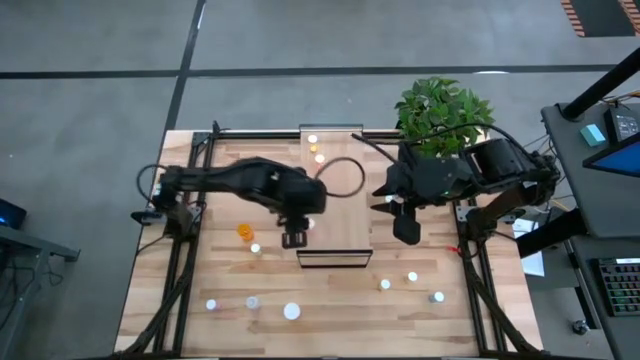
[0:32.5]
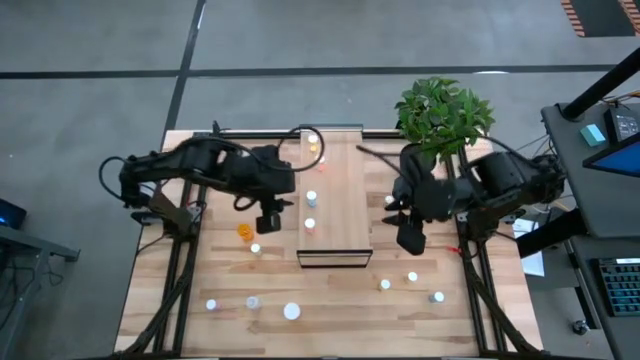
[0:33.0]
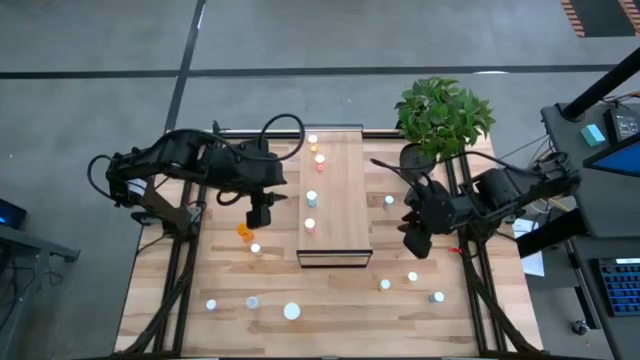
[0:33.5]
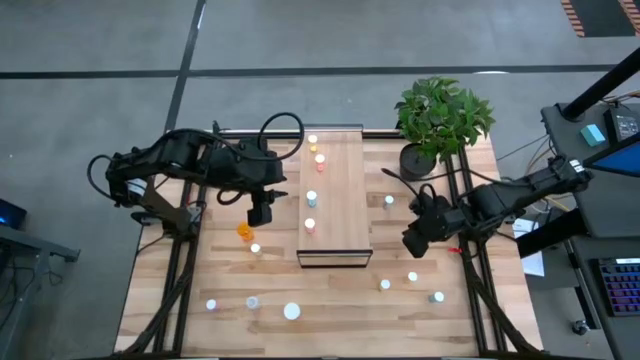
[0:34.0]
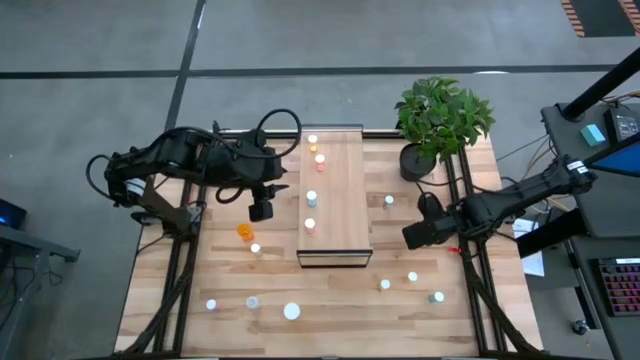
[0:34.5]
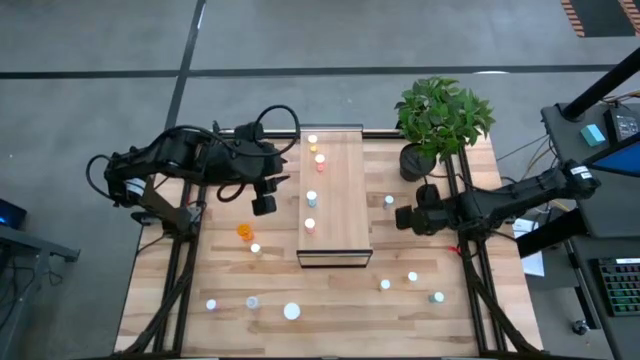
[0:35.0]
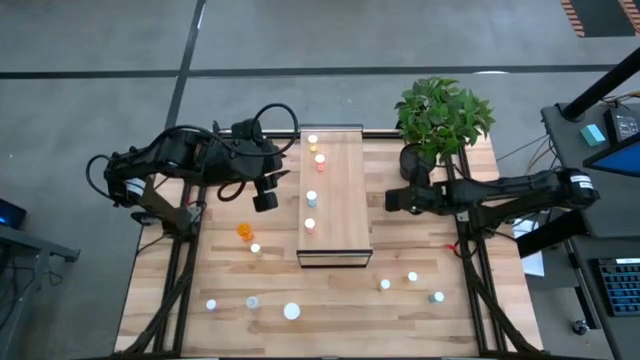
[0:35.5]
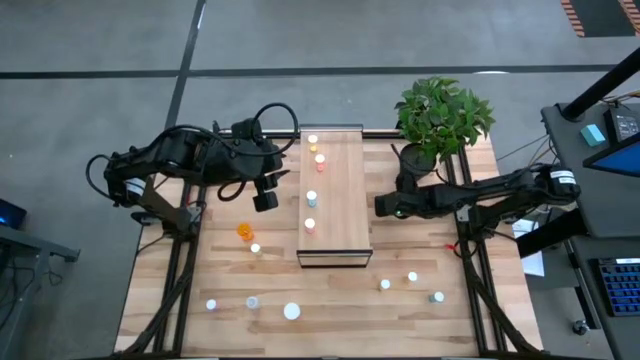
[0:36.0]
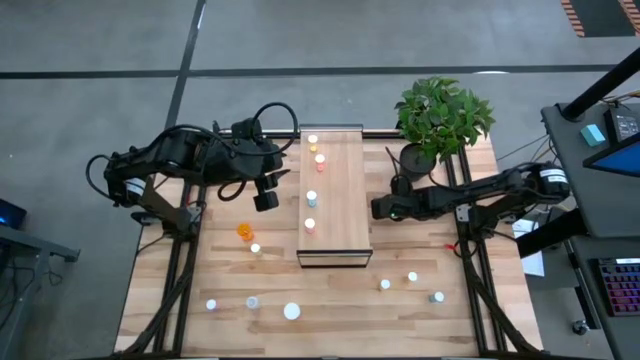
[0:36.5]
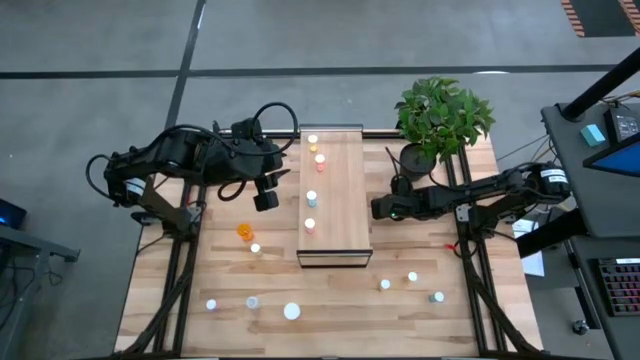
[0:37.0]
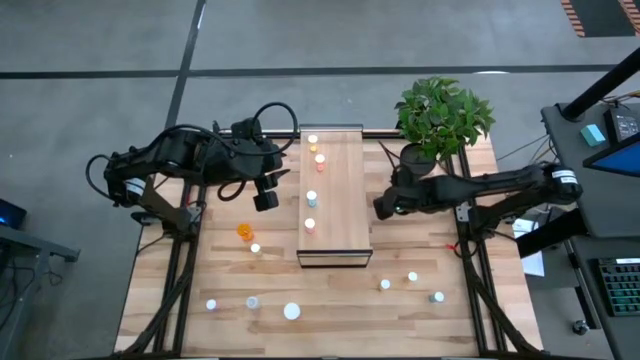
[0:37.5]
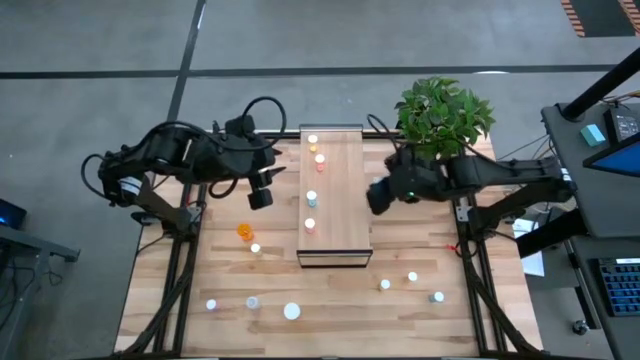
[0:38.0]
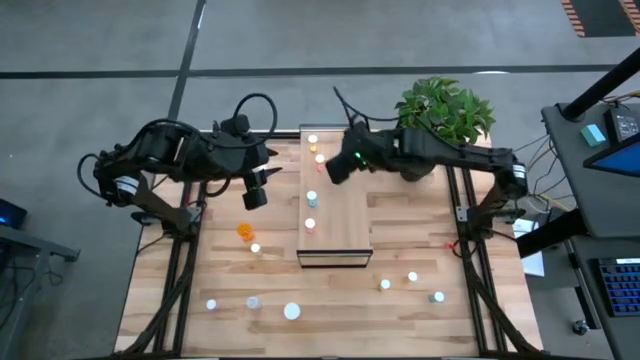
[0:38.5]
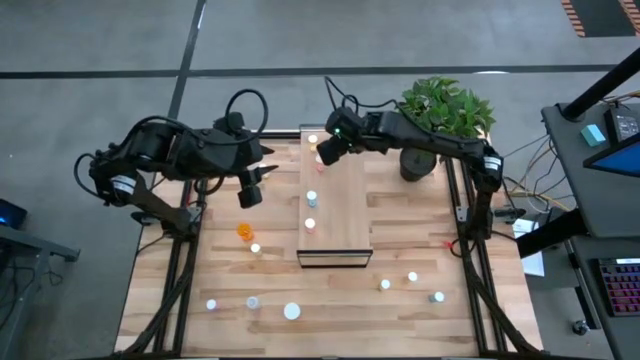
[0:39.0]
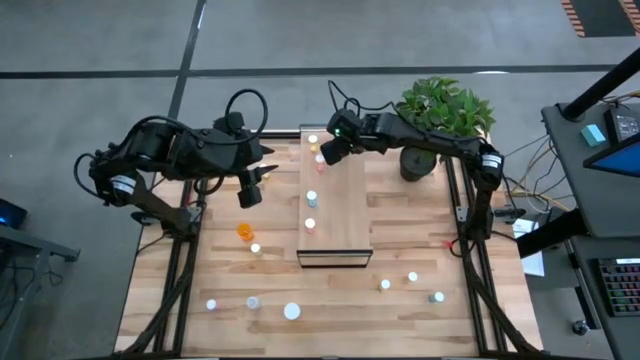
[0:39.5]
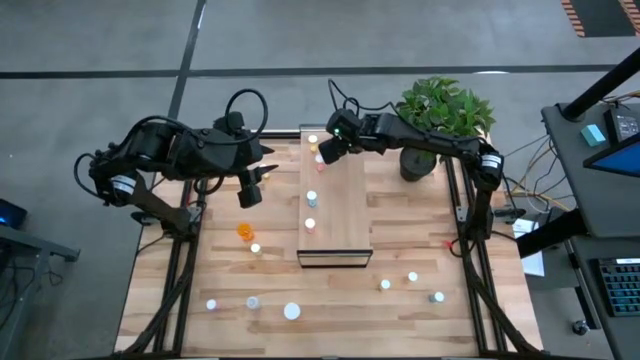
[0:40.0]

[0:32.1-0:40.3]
Task: Pick and place medicine bottles onto shelf by color
Put the top blue bottle on the shelf

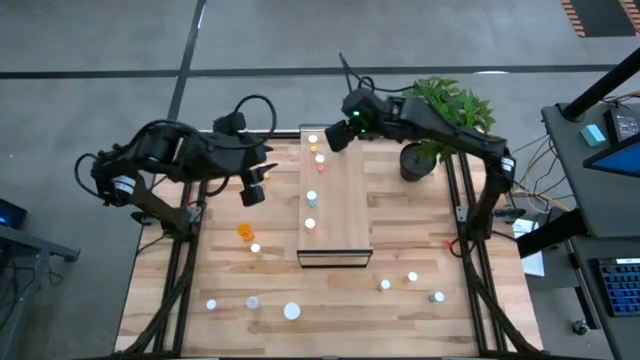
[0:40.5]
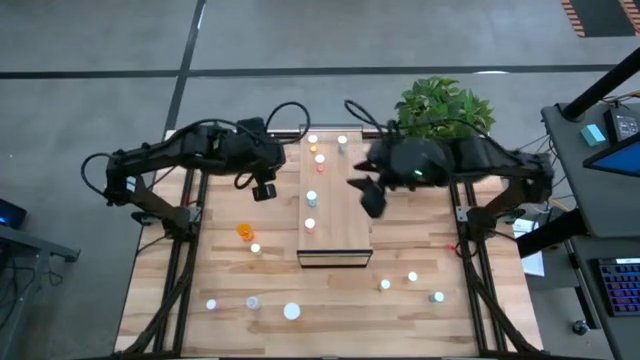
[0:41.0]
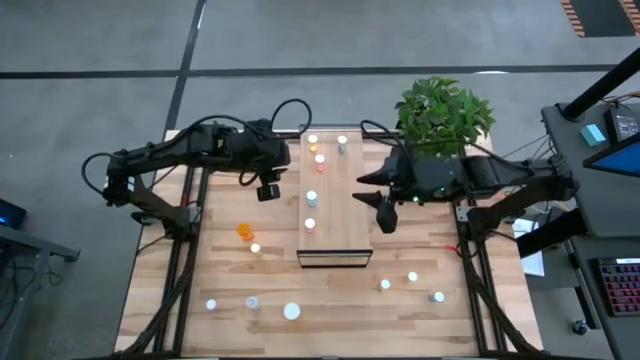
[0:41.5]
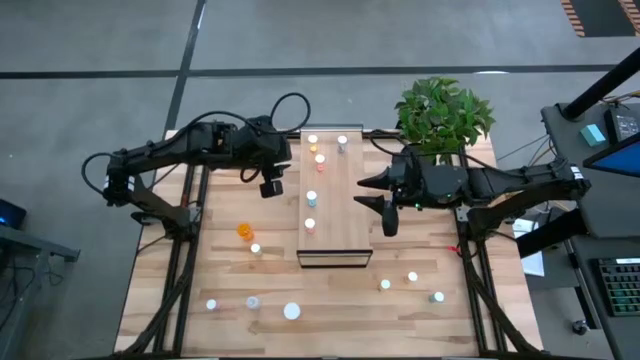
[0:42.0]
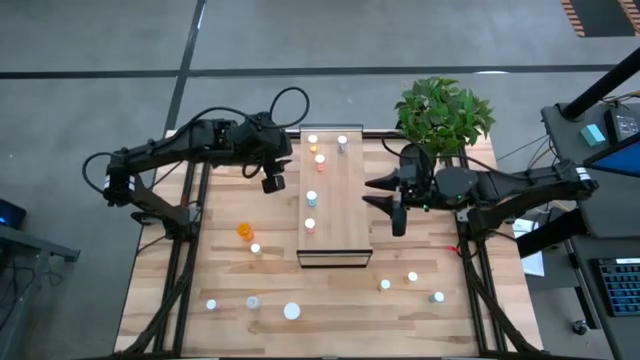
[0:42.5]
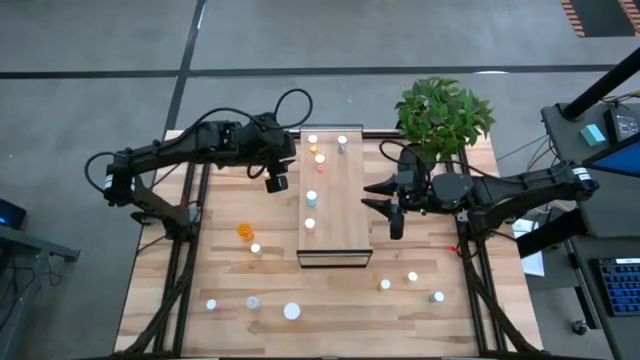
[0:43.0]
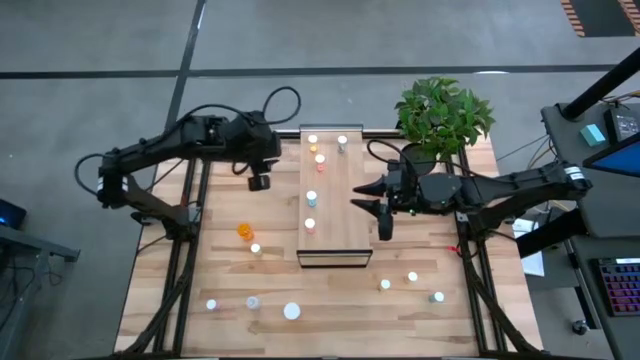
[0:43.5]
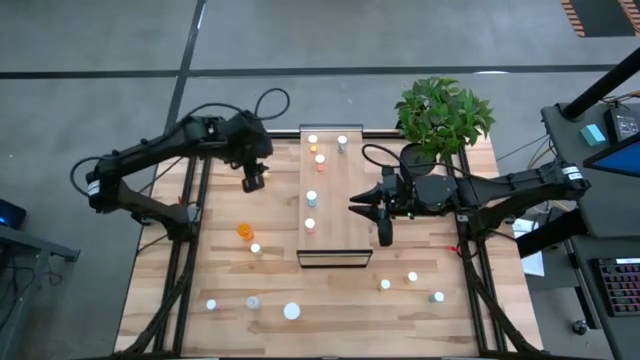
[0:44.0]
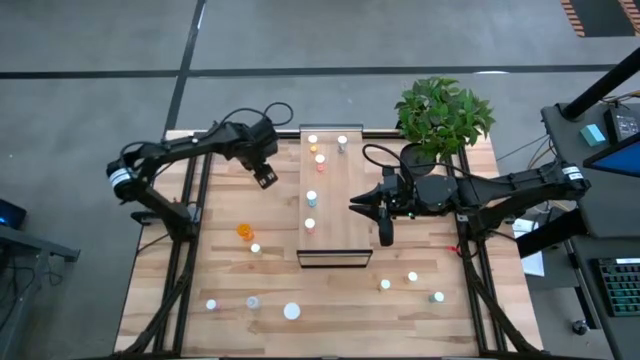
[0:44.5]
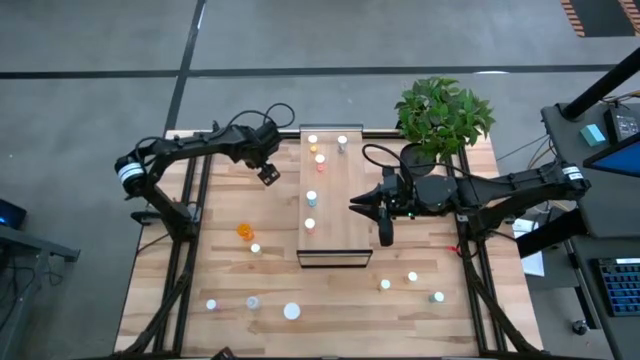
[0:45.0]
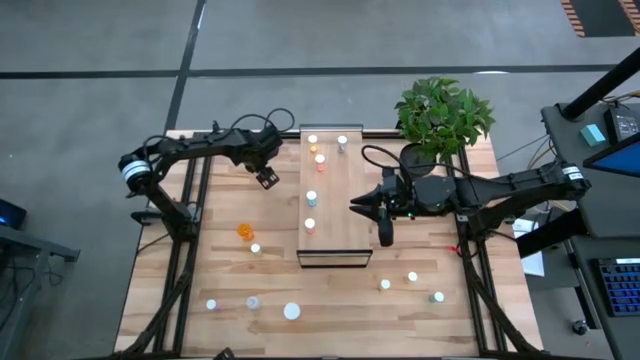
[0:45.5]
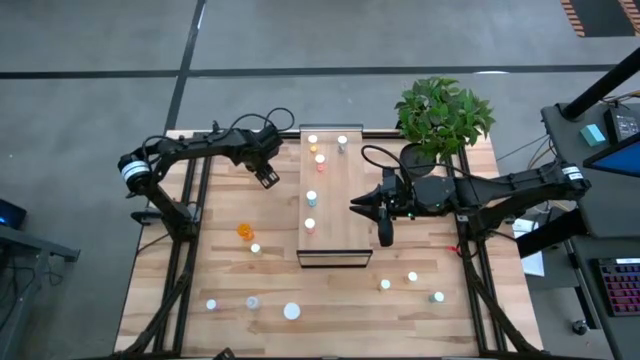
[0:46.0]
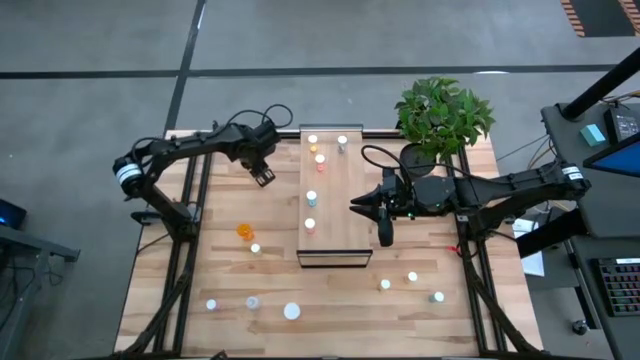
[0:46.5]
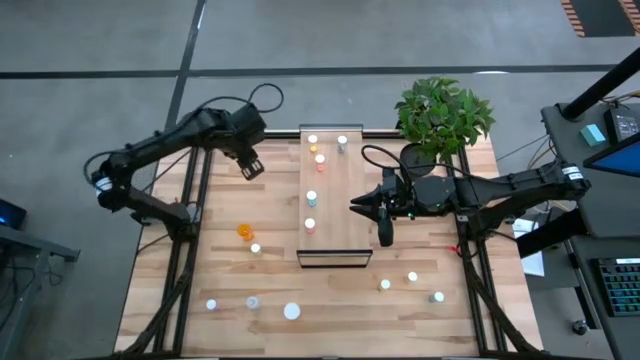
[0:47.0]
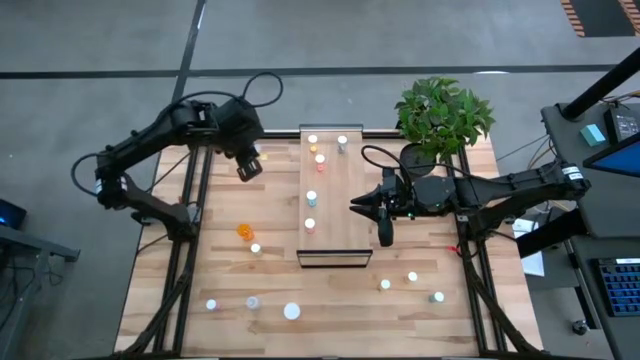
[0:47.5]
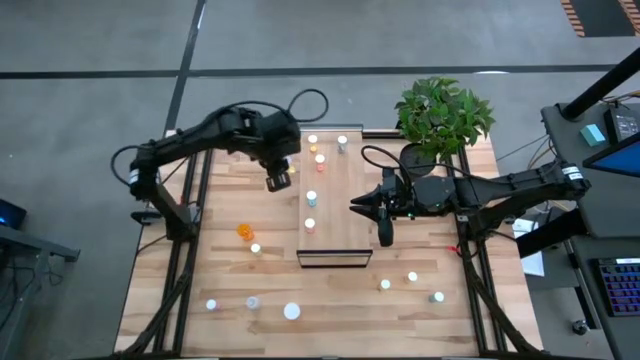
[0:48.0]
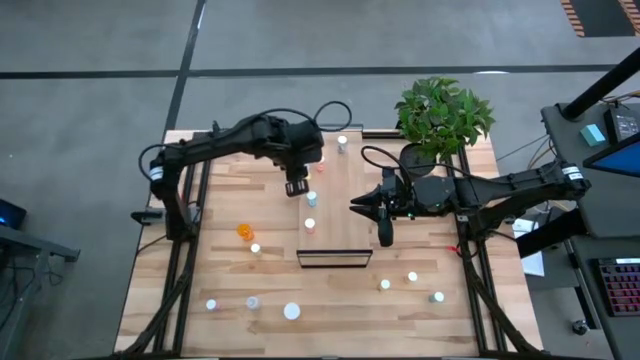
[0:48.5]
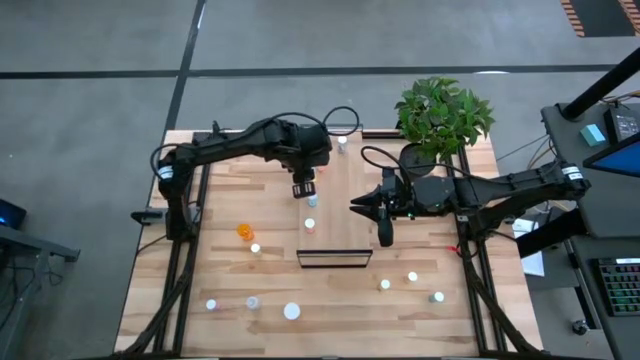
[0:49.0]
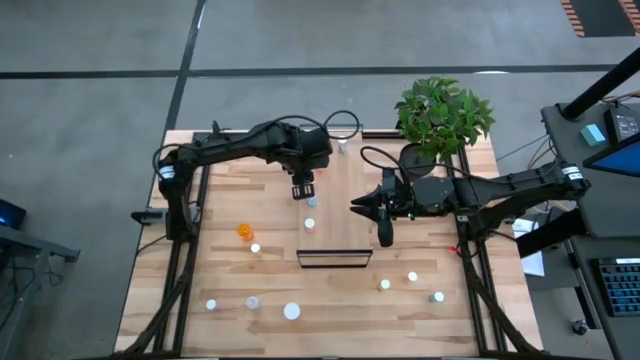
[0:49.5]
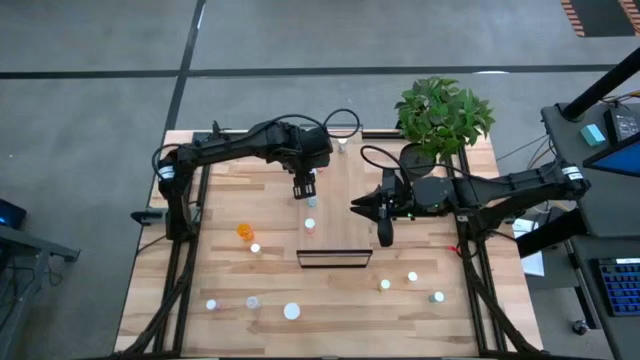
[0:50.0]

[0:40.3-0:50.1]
Put the top yellow bottle on the shelf

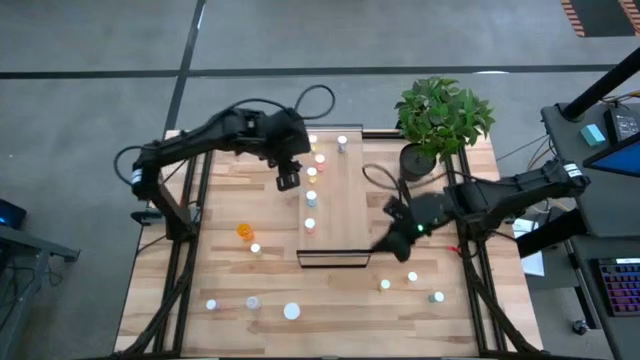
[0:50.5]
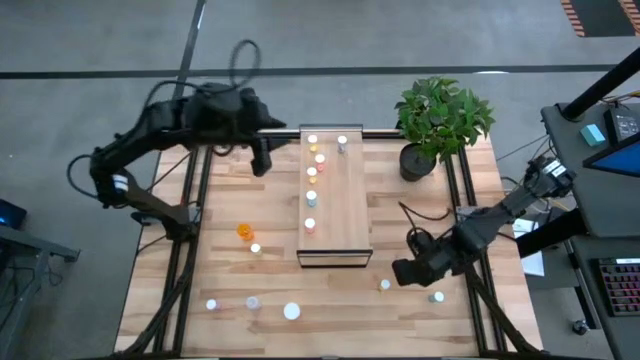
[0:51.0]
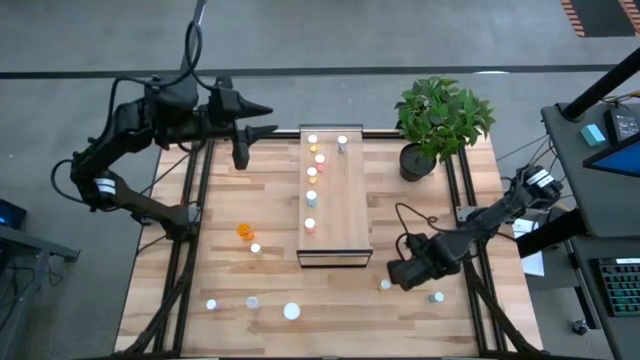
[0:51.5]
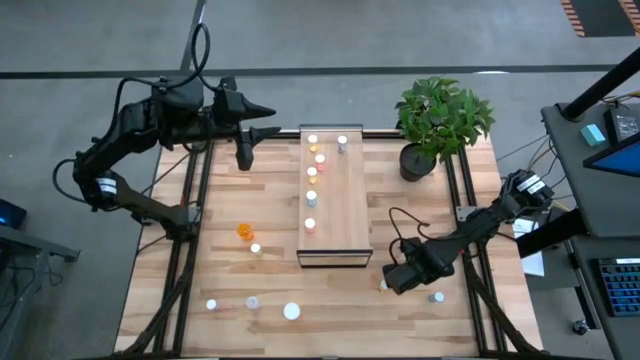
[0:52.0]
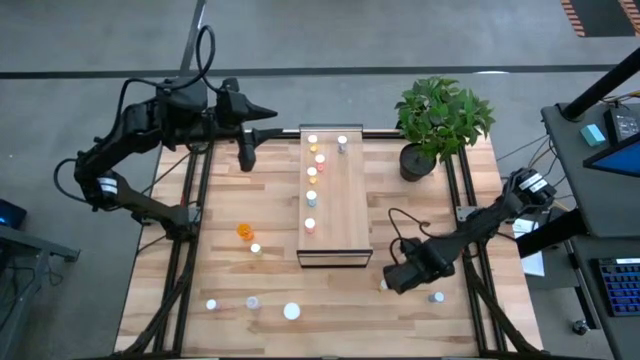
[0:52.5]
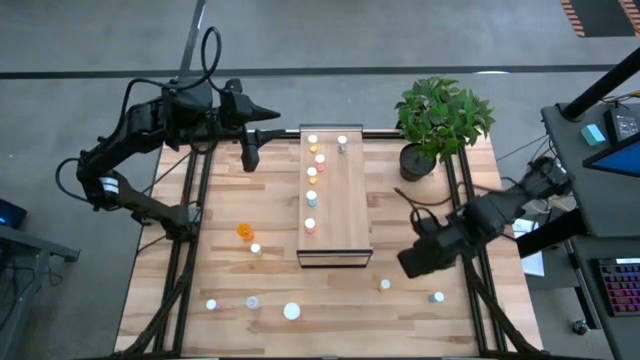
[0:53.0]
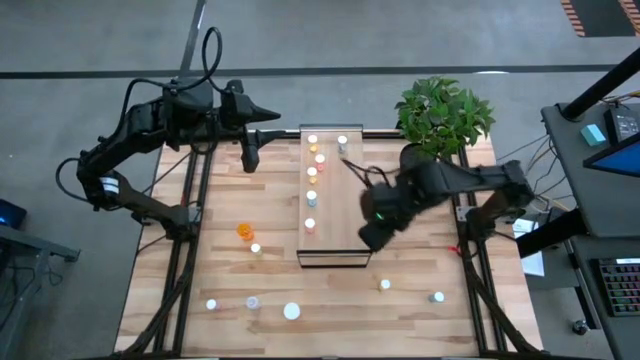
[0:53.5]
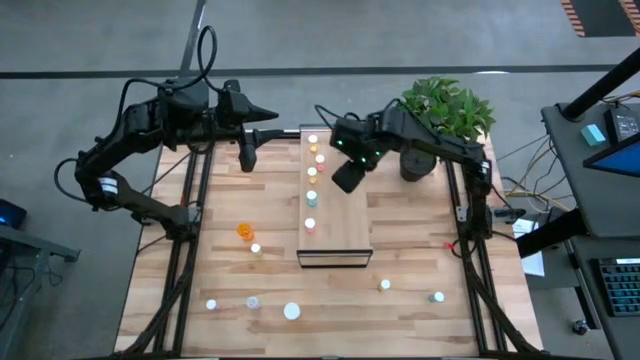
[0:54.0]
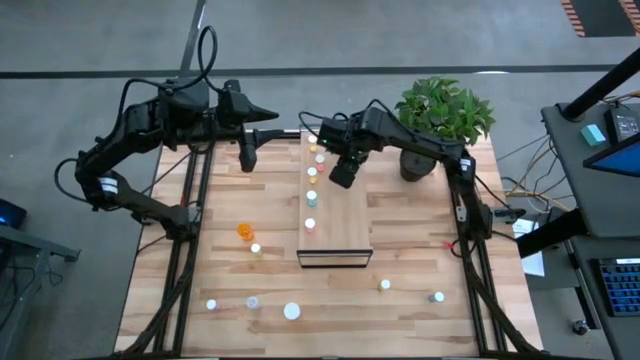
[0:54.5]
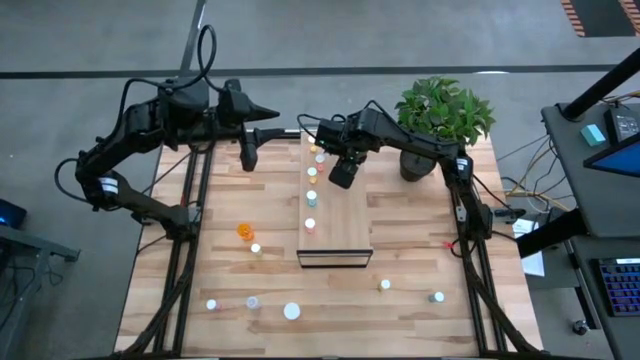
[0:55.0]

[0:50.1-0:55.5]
Put the right yellow bottle on the shelf
